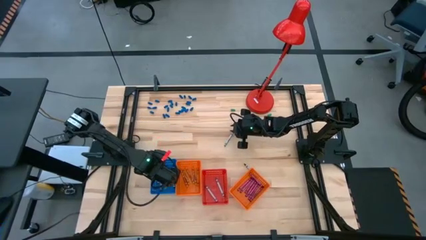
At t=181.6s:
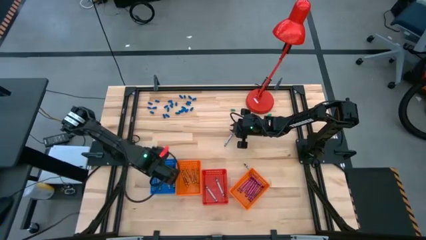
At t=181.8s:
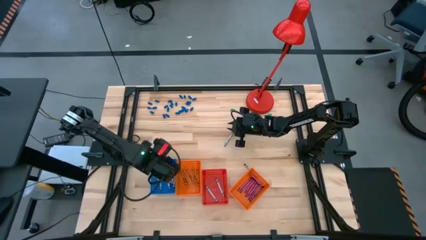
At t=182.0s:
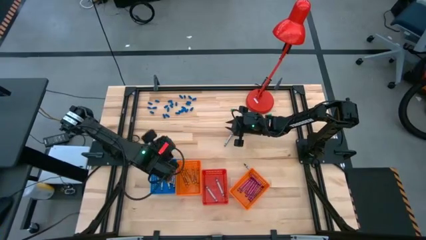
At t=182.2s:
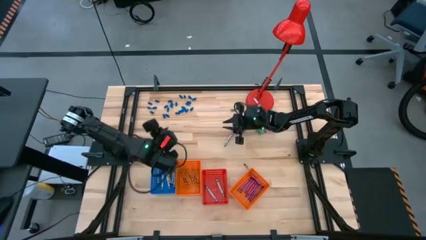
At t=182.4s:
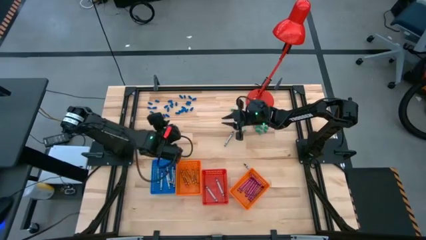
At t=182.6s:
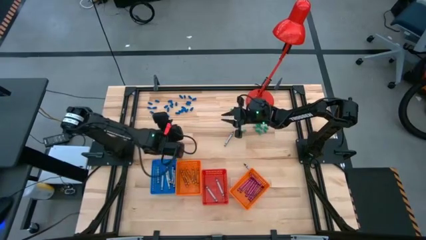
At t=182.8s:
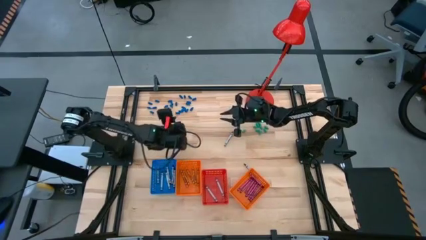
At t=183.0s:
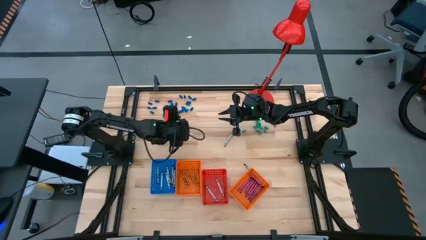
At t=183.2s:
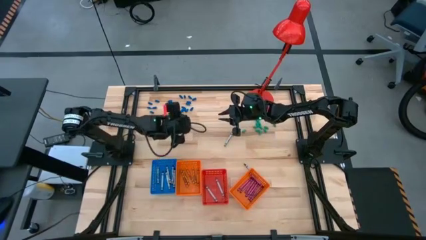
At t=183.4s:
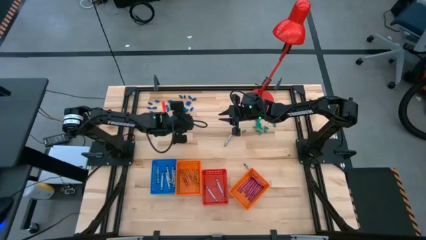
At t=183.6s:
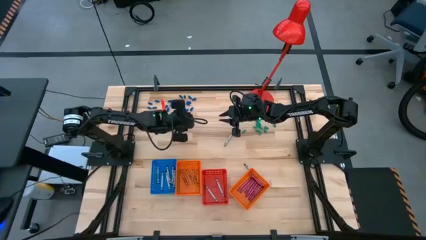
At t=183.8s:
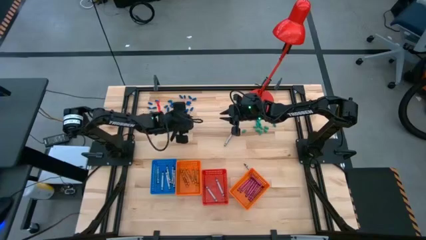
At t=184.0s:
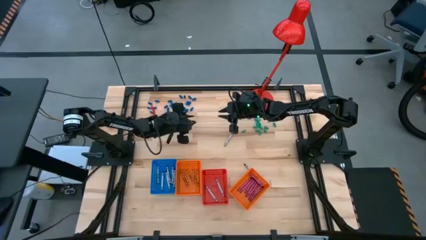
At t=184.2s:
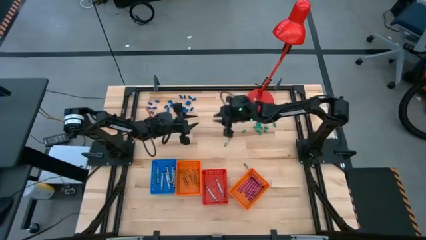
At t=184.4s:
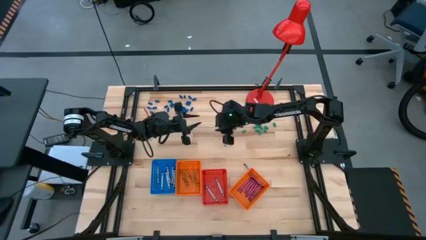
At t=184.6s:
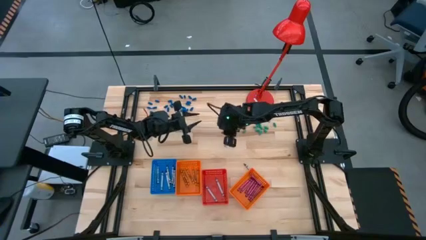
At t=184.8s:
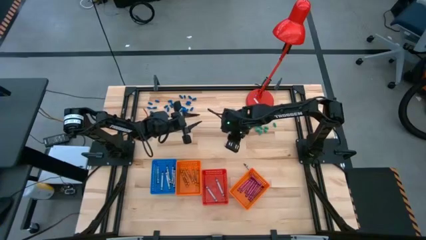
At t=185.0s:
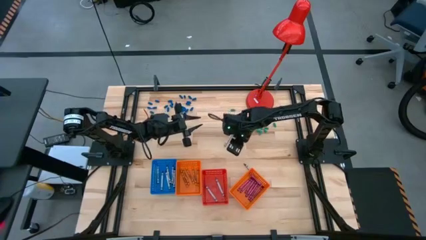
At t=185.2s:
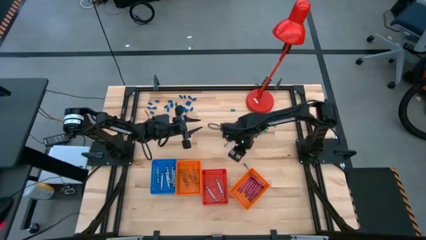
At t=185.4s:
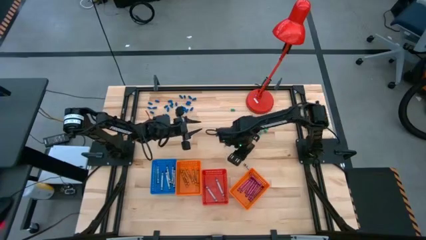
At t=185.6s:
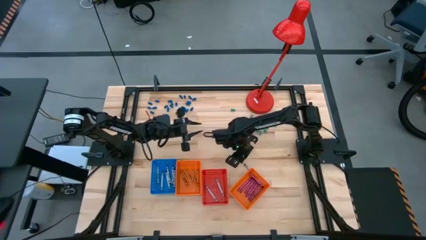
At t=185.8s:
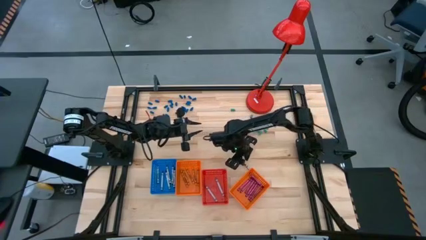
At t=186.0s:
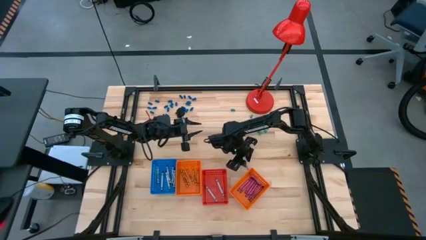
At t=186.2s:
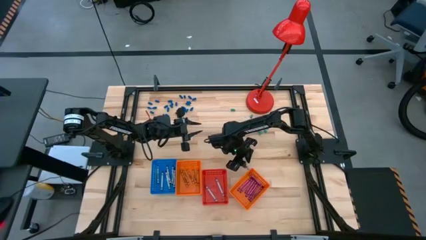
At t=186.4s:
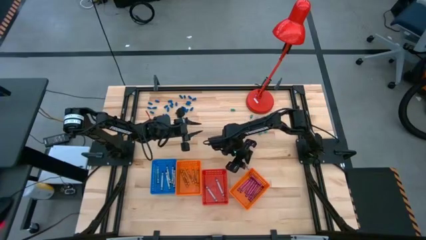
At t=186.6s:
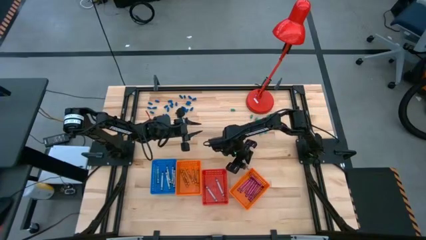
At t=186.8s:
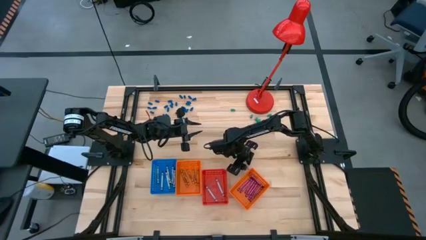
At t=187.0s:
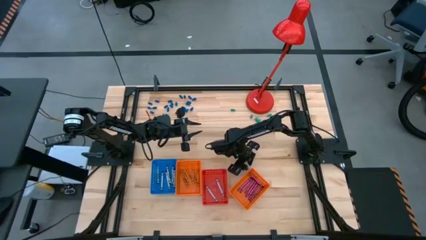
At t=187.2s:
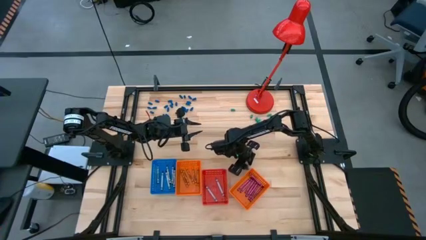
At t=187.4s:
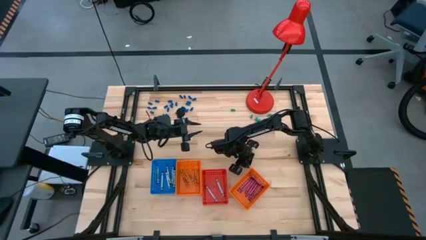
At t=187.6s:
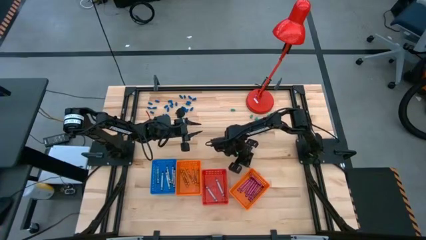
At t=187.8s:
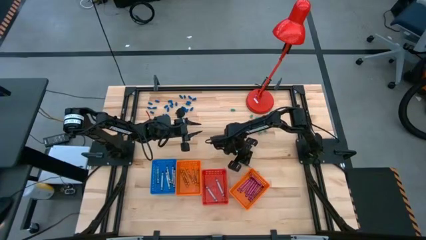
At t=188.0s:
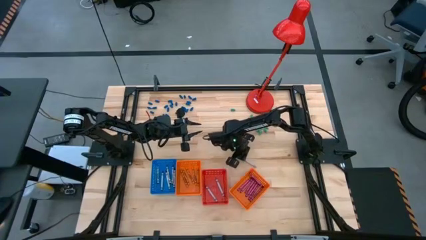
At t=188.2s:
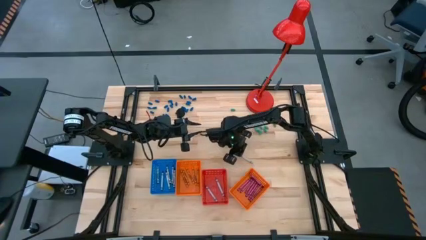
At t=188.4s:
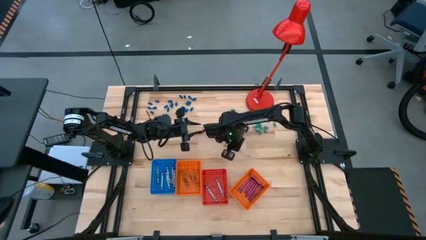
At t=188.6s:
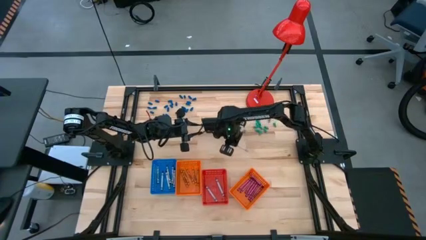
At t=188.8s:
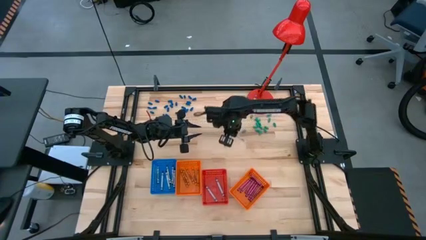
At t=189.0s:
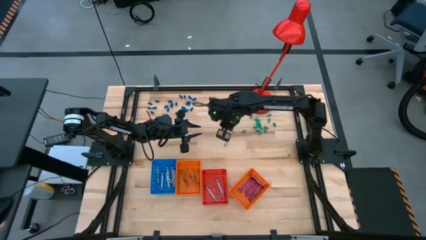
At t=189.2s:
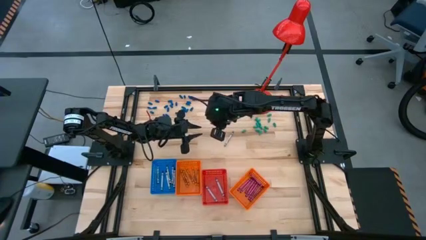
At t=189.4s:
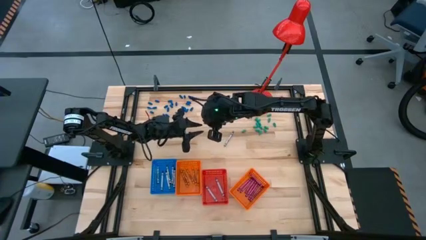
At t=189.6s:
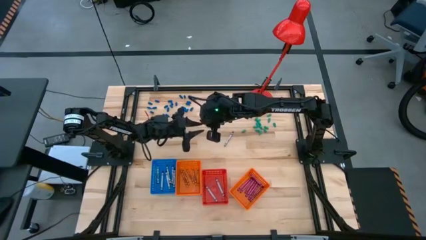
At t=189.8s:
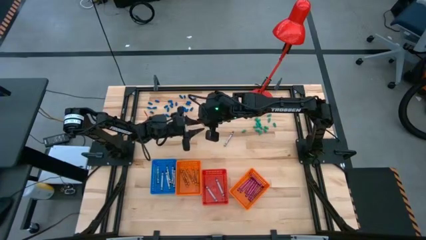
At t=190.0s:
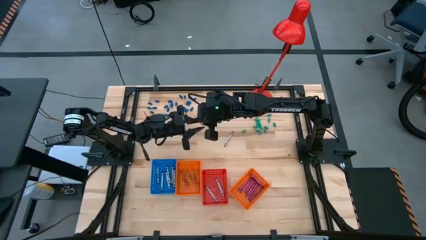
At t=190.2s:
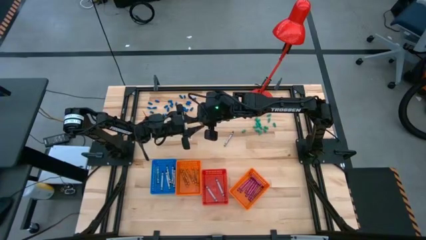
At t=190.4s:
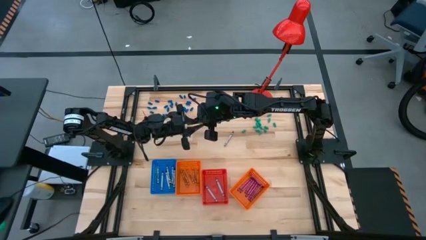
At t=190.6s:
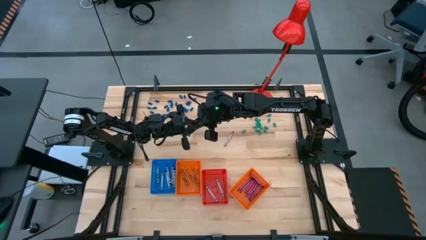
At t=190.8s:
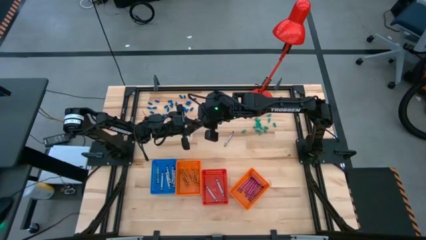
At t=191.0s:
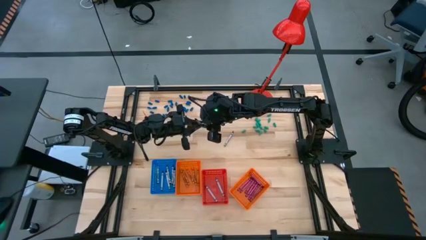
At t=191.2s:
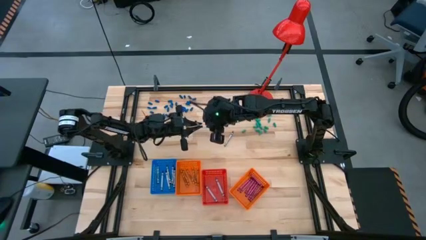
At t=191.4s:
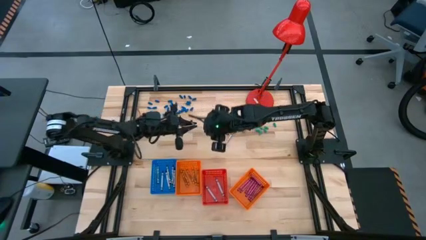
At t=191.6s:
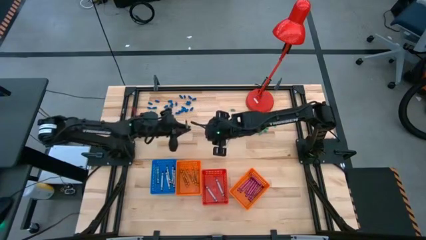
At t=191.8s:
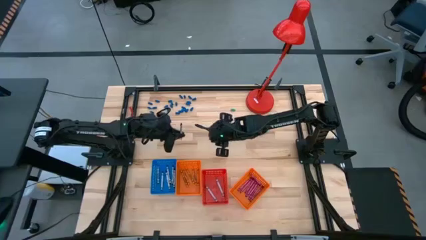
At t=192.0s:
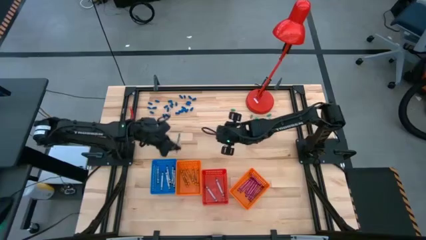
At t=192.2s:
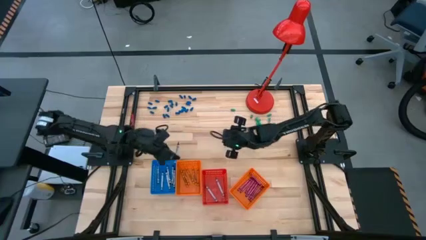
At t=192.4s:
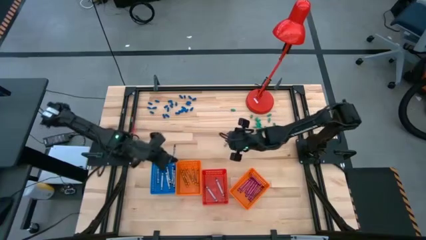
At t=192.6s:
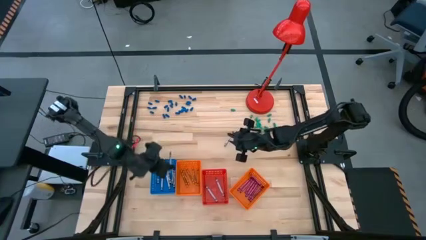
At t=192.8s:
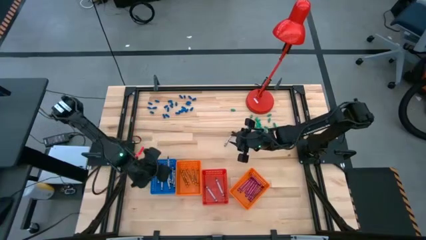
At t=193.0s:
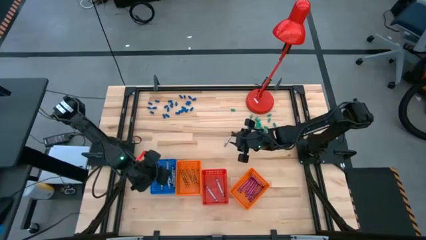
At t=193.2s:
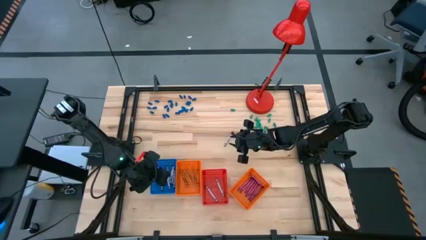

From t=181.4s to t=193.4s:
Task: Sort crayons
Put the black crayon into the blue bin

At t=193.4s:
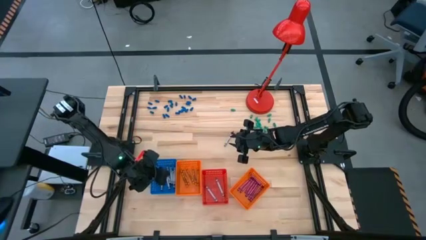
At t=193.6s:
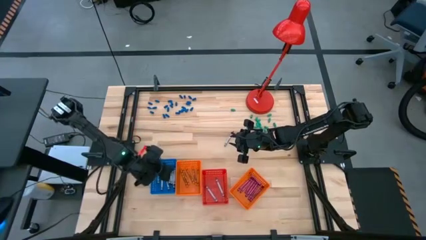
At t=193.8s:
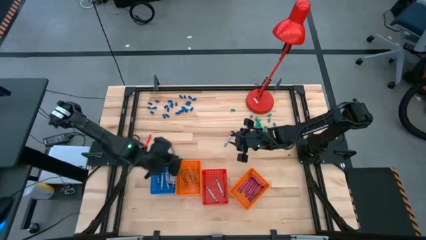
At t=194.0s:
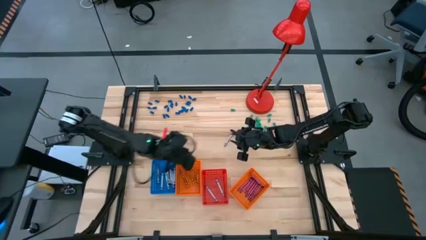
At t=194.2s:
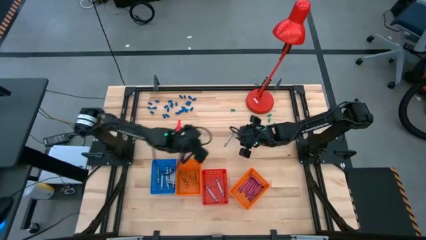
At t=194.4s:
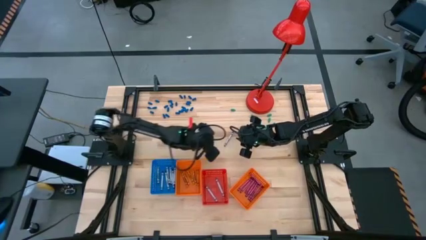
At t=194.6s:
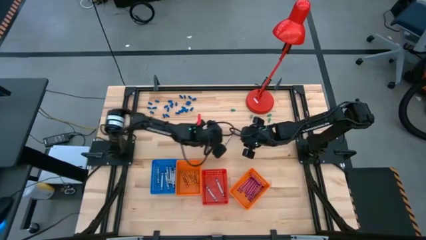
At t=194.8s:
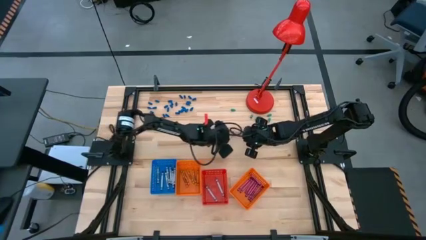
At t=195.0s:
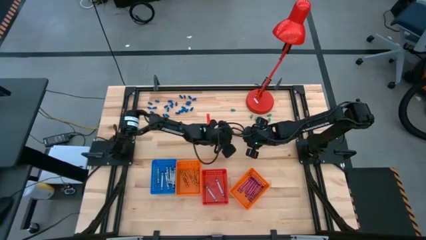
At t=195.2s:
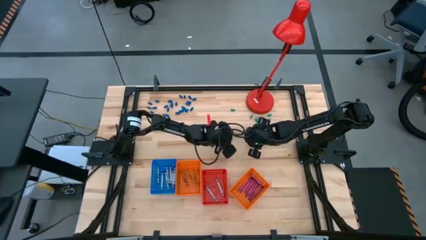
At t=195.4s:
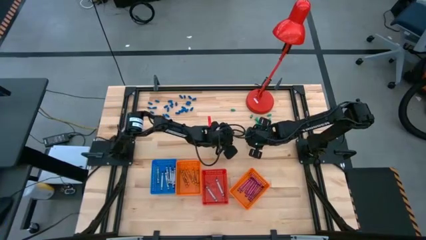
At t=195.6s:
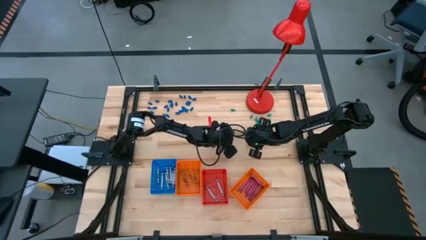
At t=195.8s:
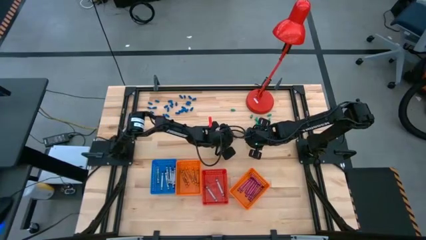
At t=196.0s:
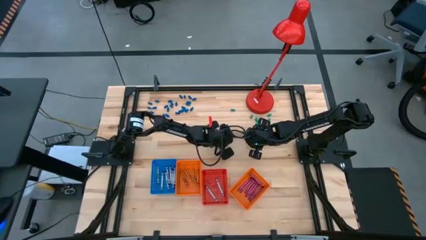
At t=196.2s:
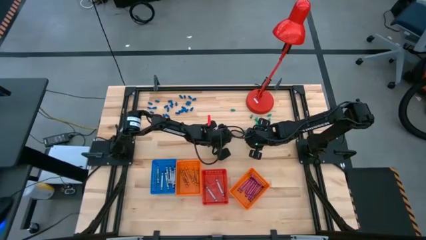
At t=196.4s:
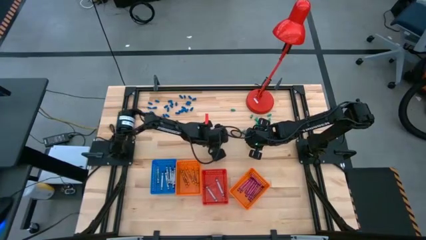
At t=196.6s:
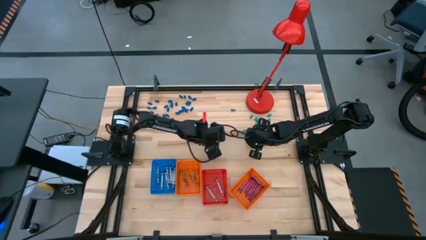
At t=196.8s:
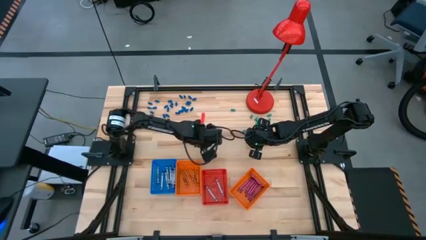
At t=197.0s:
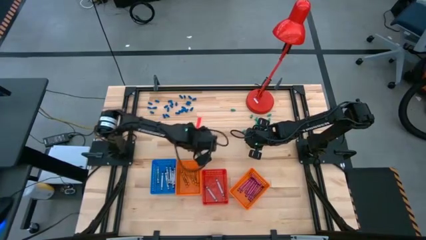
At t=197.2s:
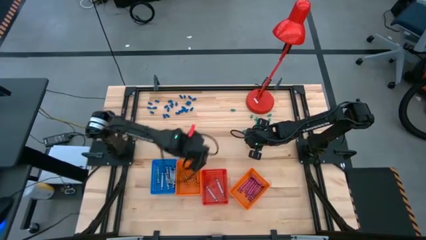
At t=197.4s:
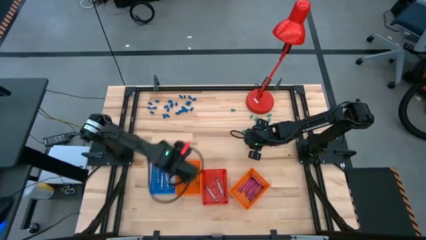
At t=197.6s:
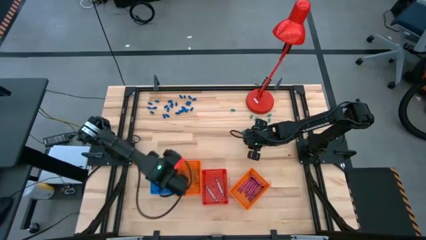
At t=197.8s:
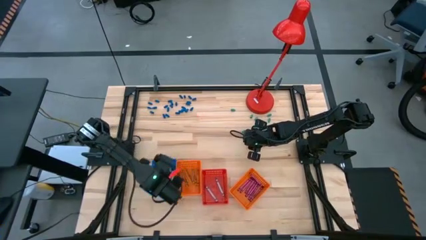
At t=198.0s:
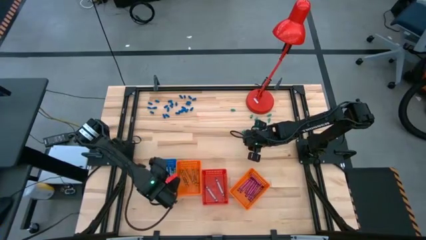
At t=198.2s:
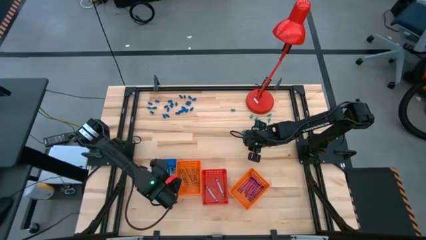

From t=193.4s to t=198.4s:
Put the black crayon into the blue bin

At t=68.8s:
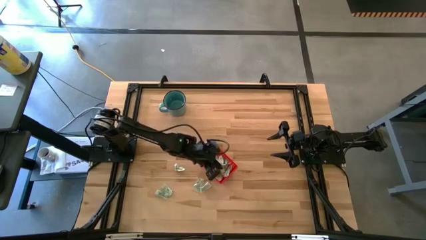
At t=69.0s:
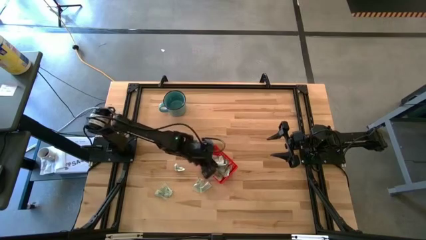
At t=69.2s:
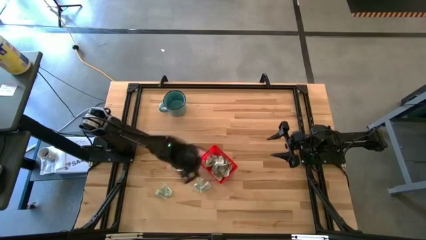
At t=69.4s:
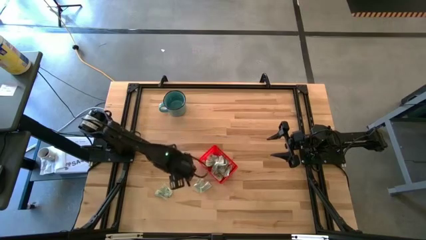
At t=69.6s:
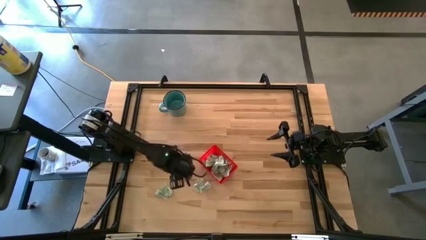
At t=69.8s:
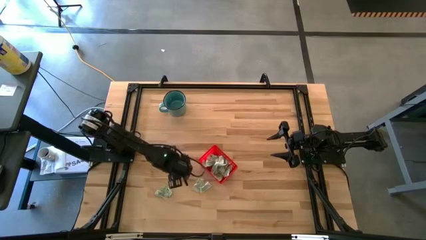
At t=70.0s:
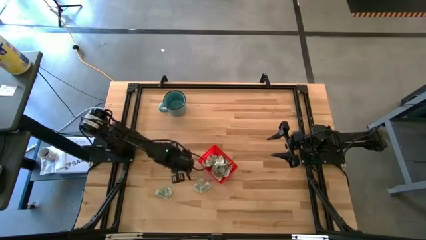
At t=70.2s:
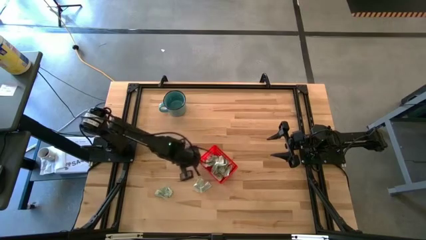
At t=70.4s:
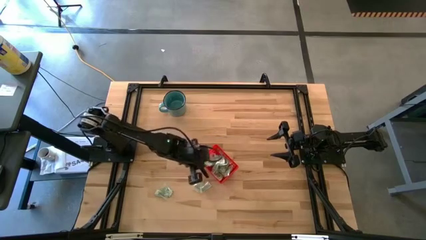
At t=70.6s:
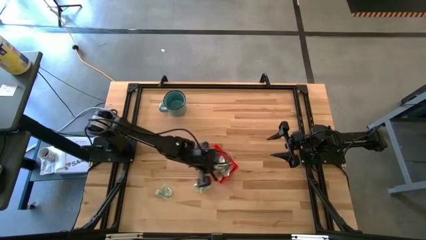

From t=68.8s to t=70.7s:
Task: Pick and place Stevia / Truvia into bins
Put the white stevia packet into the basket
